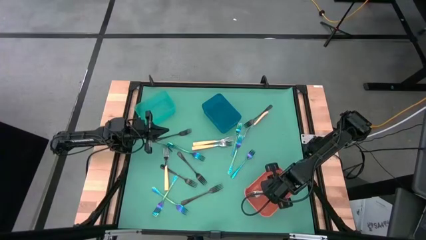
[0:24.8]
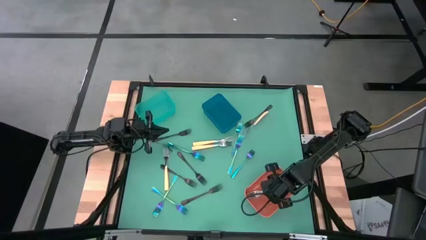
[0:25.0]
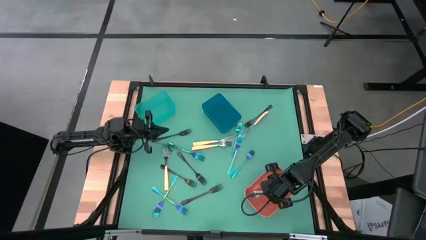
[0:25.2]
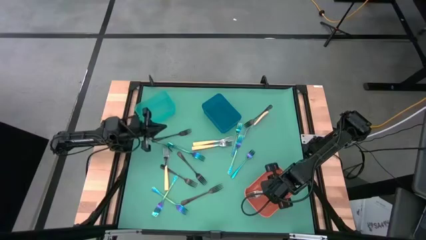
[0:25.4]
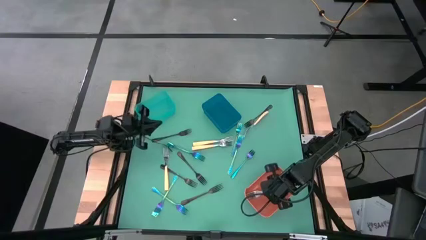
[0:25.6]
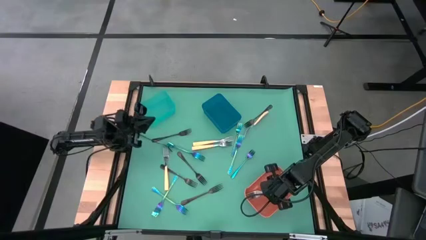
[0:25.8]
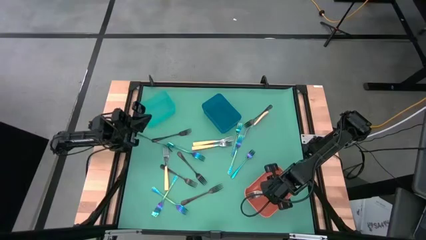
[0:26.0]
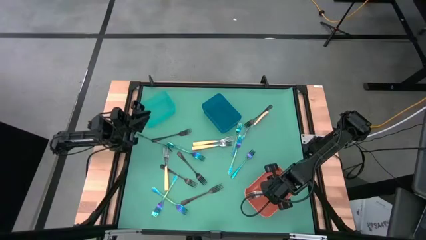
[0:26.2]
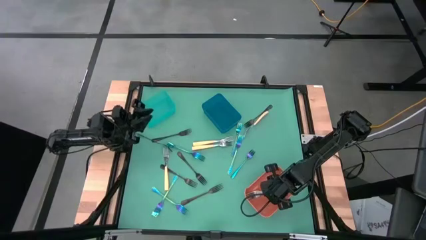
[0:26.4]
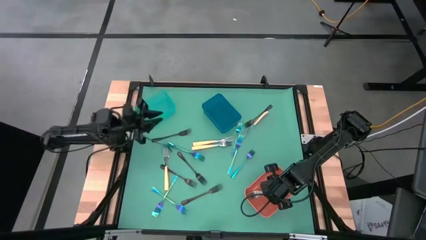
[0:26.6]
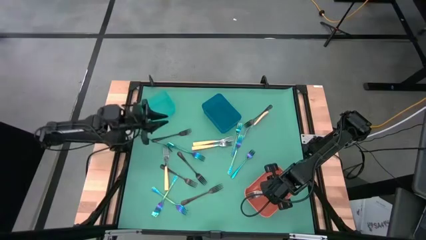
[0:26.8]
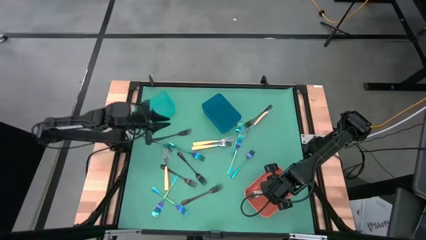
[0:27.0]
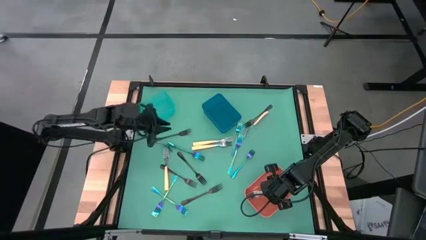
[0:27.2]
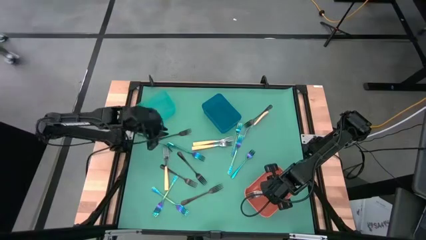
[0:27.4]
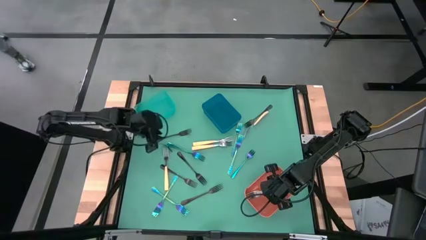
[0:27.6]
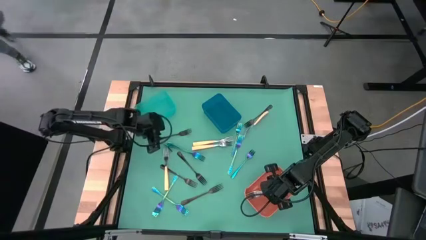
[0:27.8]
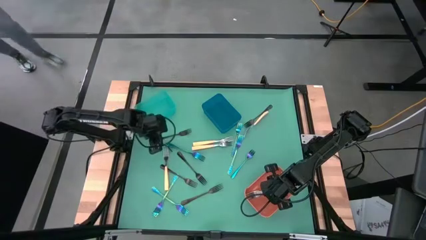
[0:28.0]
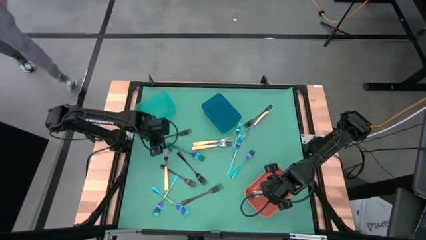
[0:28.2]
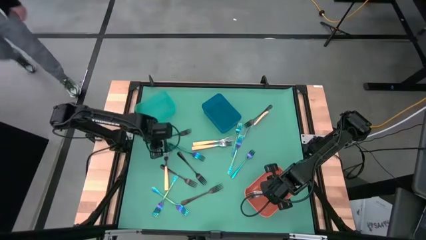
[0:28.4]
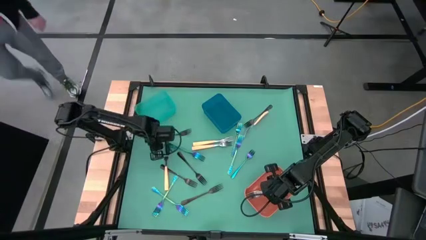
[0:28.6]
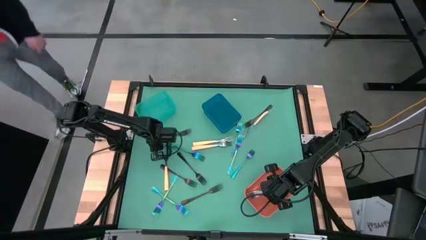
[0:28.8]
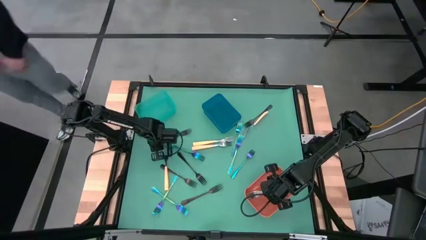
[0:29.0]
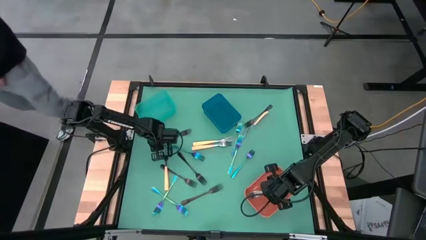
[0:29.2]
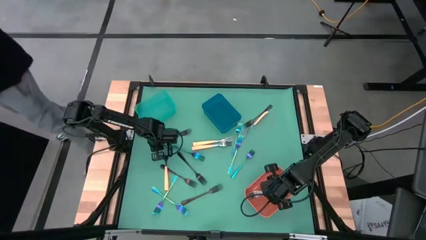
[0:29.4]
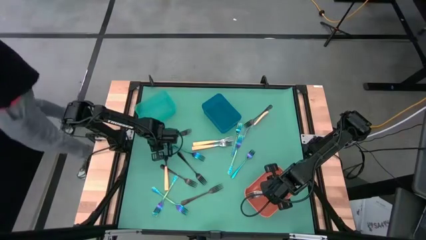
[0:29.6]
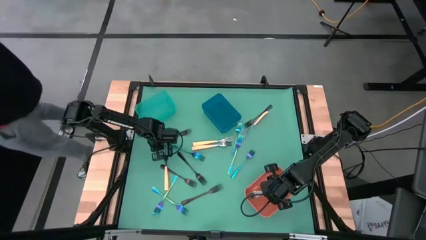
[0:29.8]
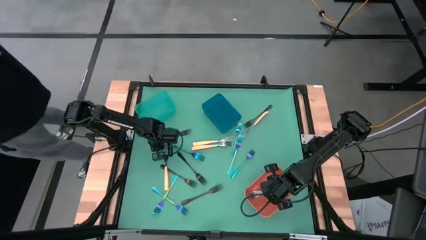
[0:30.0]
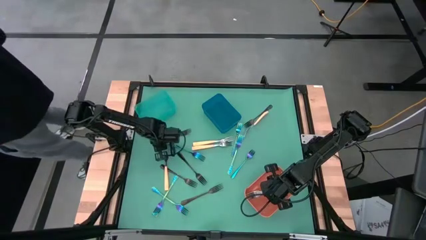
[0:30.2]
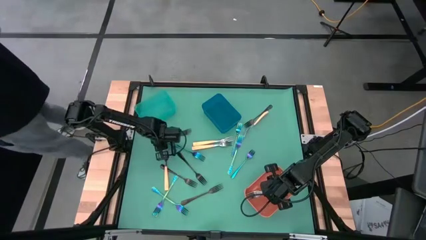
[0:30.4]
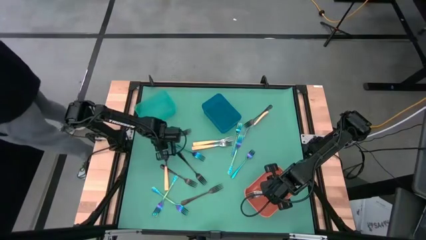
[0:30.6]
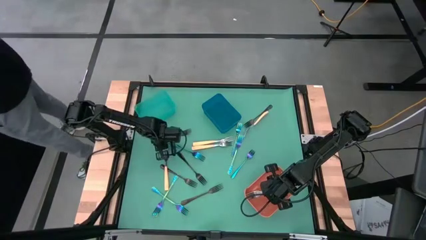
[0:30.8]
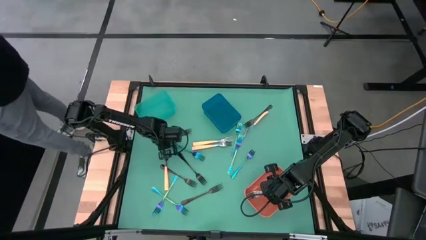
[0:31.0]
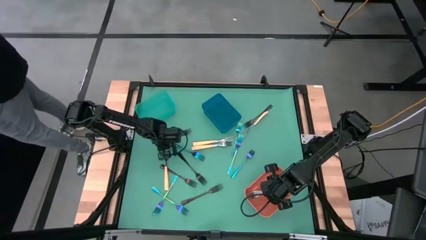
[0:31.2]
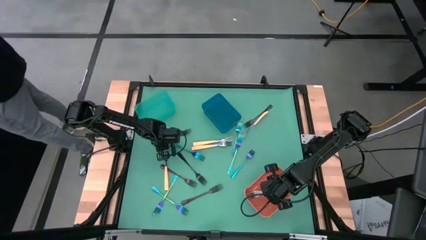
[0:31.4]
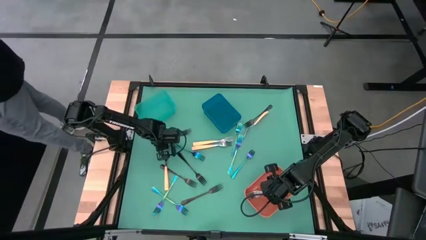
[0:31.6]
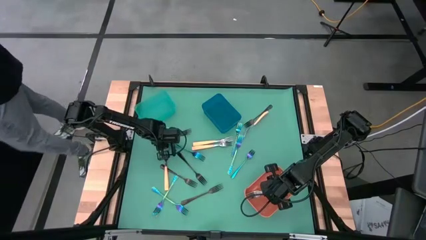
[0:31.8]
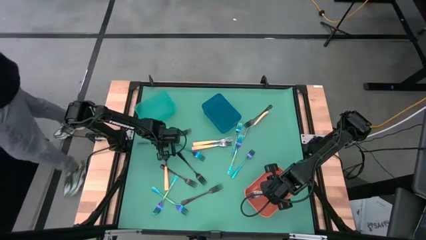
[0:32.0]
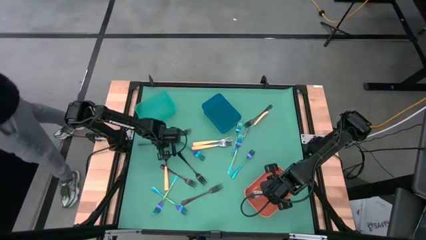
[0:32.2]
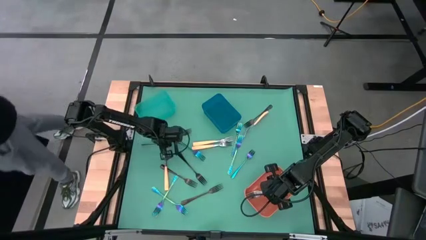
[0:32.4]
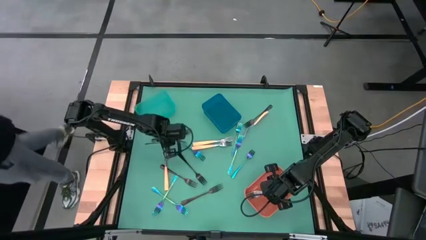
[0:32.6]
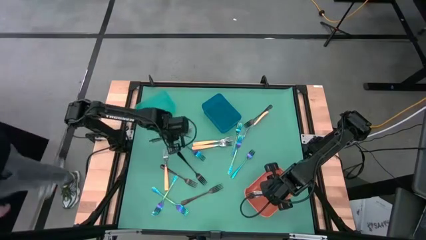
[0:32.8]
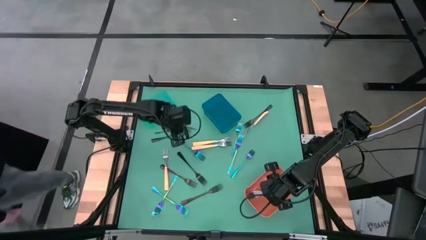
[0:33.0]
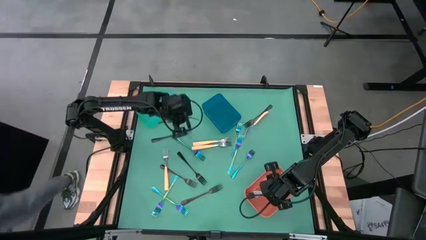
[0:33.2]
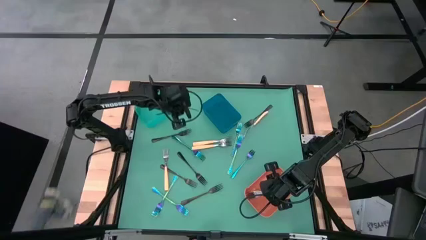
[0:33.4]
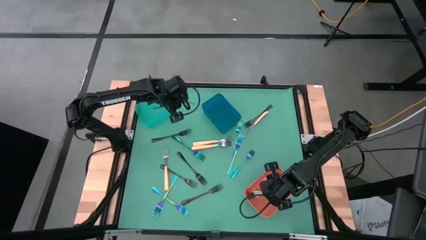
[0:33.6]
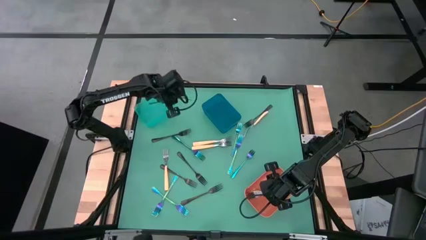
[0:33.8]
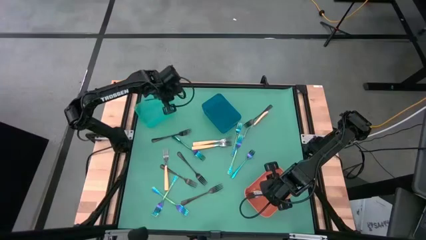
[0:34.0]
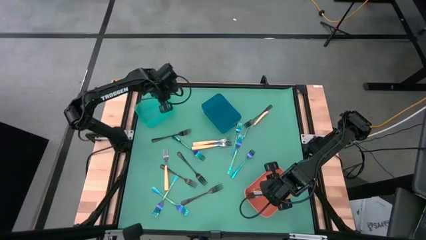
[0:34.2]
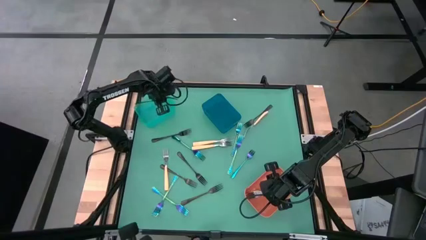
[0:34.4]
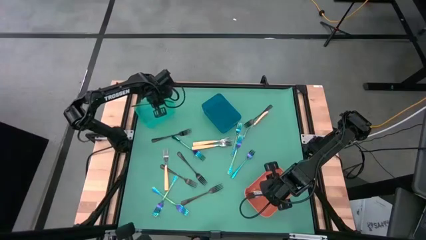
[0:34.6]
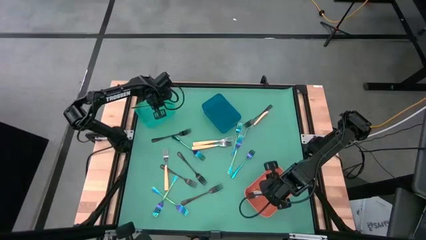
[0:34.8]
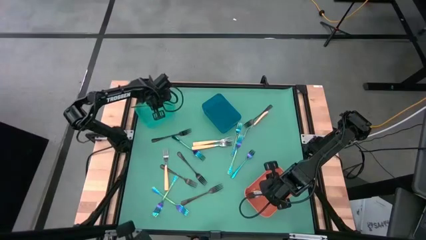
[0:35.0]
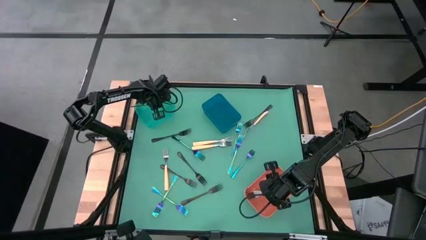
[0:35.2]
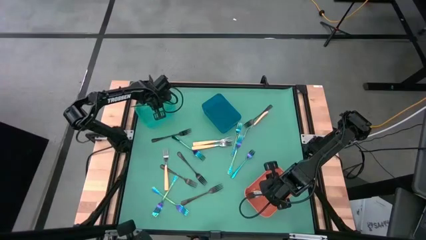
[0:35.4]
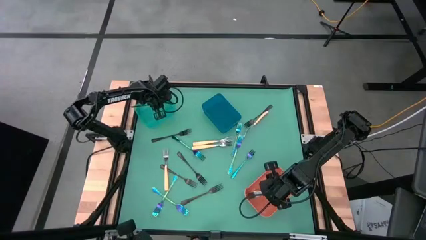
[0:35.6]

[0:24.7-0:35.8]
Task: Sort silverware by color (type)
Put the black fork into the green bin

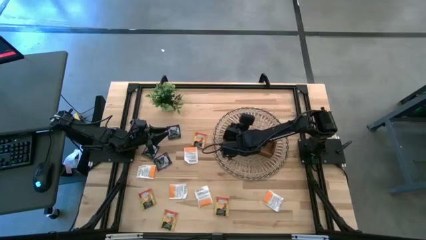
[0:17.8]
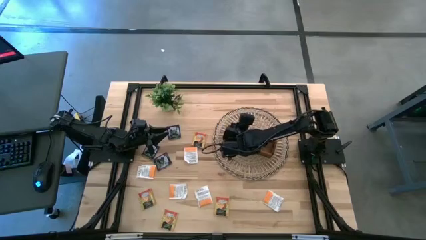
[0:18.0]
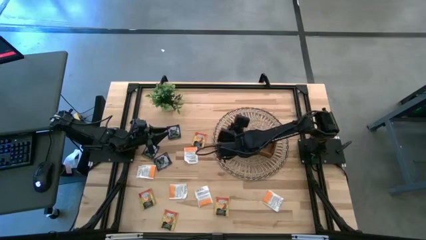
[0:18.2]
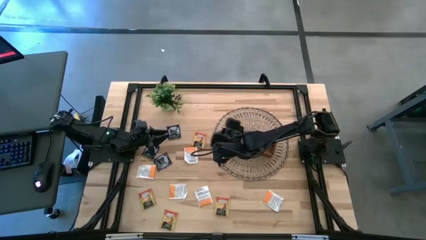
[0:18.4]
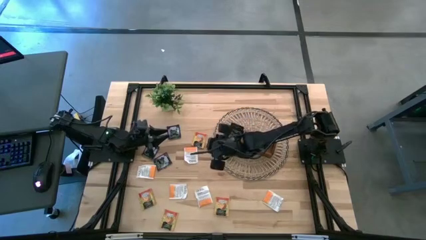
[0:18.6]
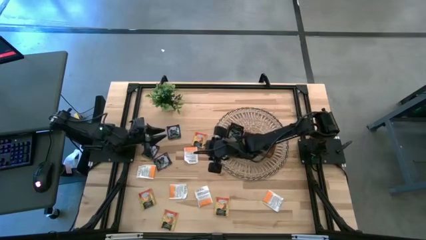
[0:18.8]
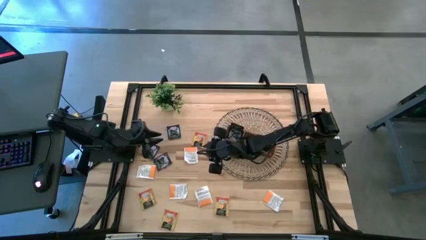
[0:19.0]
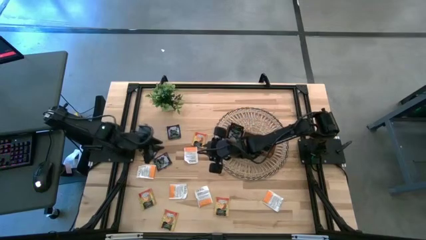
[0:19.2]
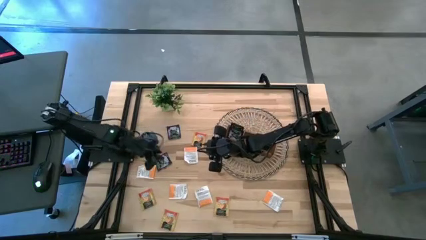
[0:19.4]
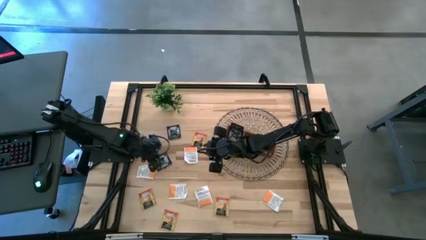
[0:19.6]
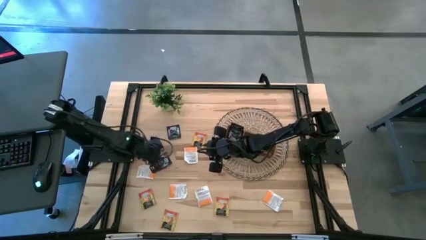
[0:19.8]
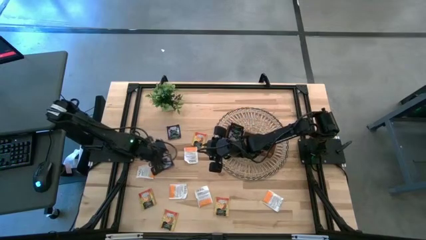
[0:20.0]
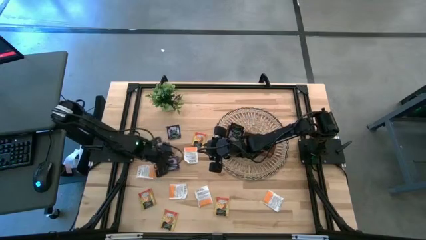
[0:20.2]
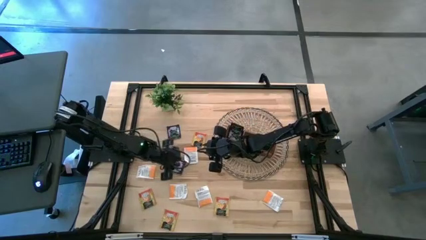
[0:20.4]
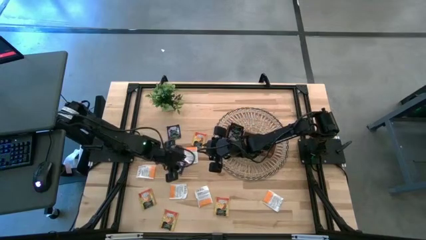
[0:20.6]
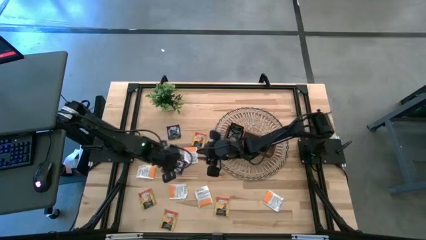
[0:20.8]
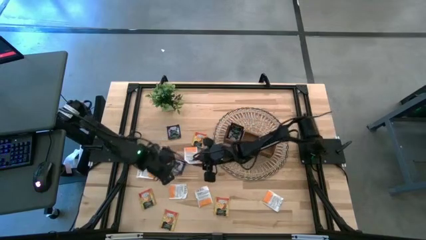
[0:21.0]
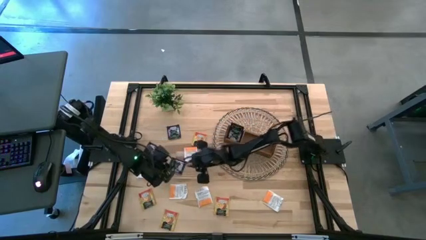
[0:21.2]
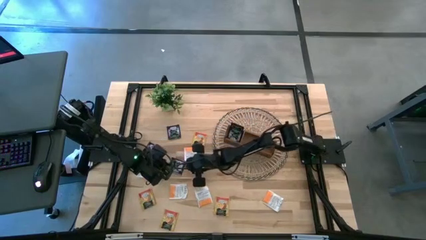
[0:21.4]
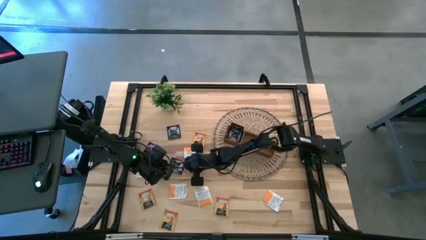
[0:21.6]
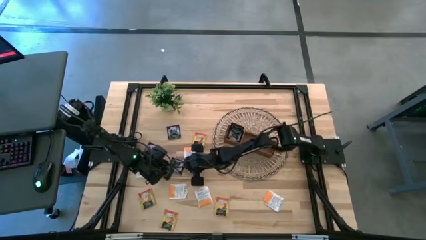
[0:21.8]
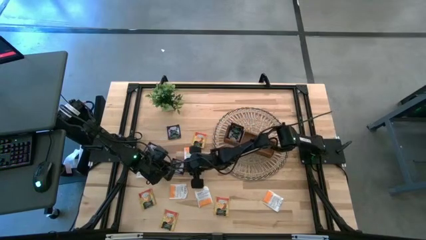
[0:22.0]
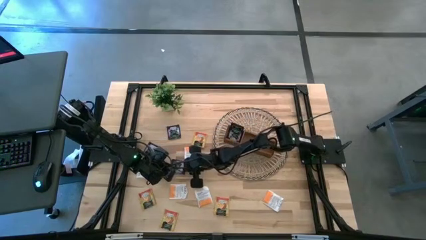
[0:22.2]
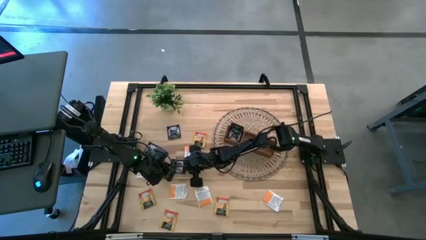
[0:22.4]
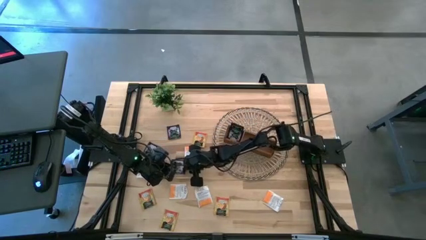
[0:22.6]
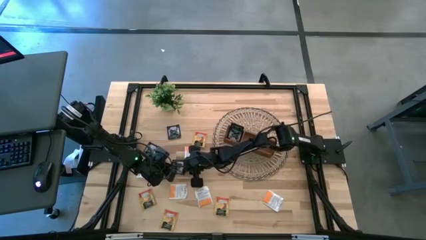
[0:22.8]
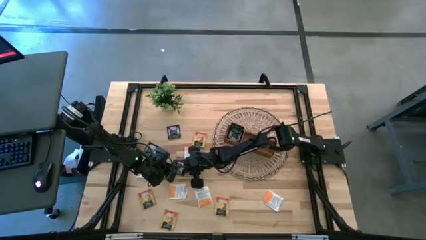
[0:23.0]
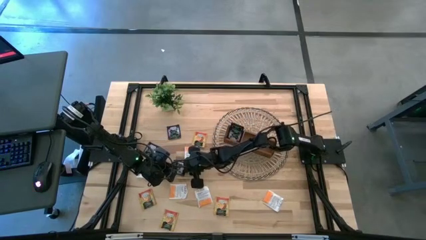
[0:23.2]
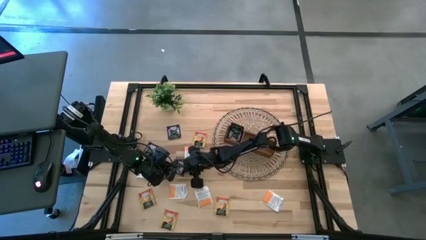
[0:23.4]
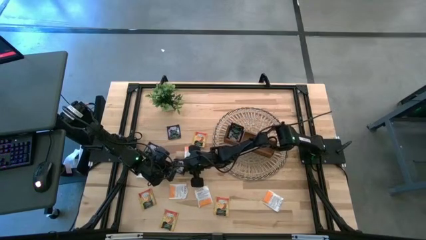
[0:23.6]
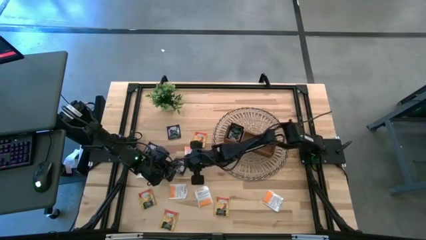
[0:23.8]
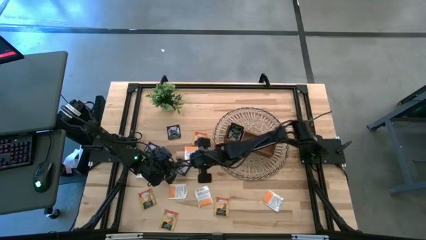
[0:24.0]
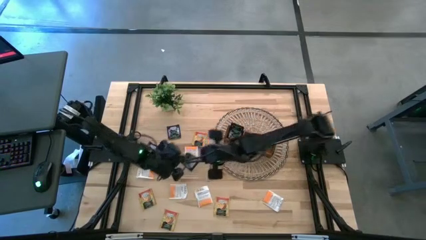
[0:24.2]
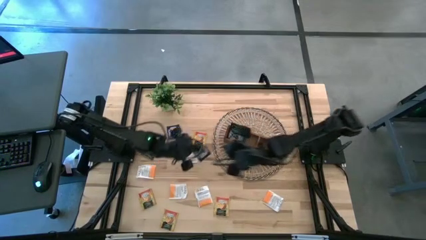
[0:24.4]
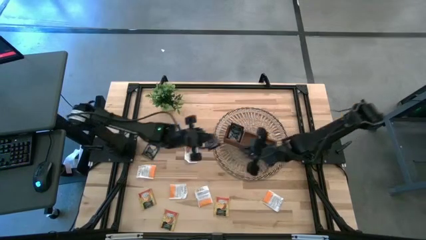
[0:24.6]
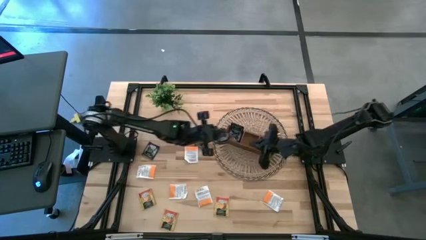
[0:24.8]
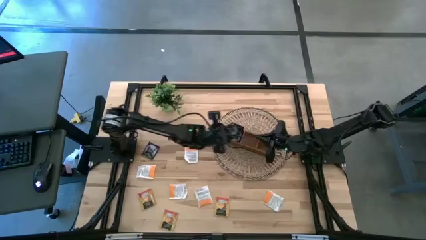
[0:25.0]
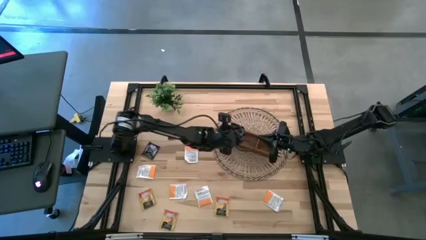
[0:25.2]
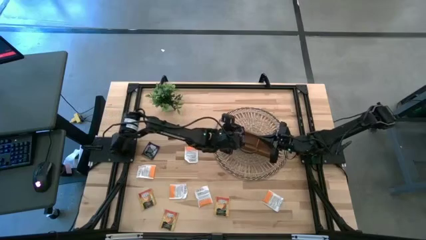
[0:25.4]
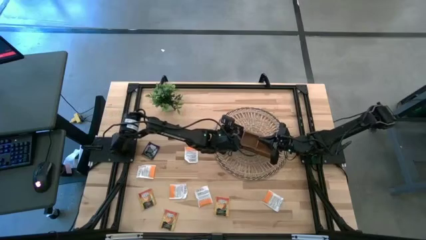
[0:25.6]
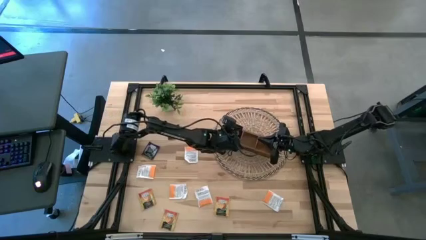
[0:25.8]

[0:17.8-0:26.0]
Task: Pick & Place Tea
Put the violet tea bag into the left section of the wooden organizer
